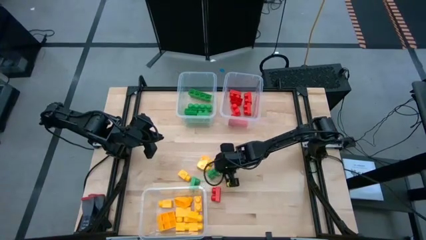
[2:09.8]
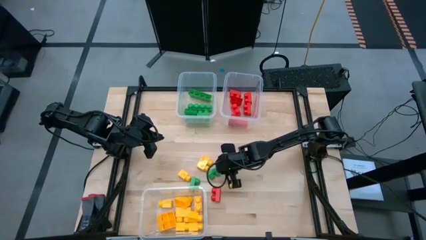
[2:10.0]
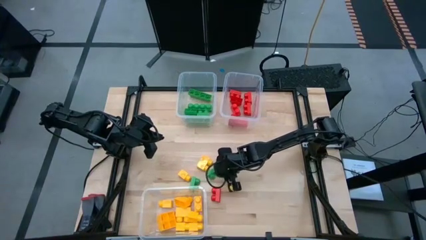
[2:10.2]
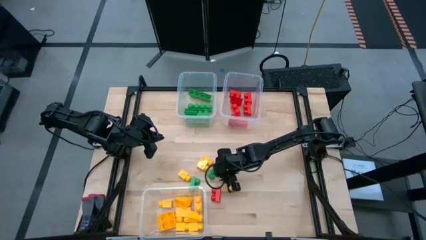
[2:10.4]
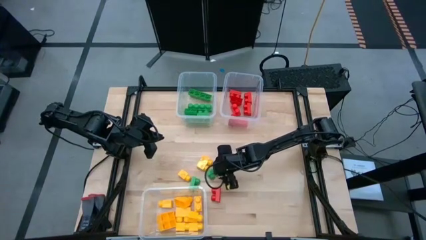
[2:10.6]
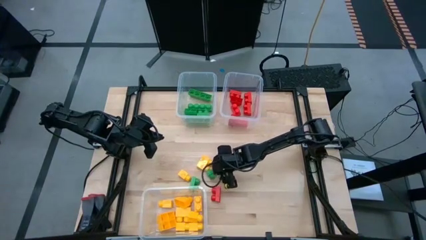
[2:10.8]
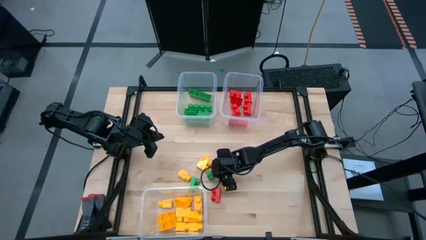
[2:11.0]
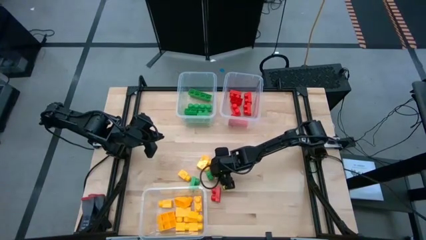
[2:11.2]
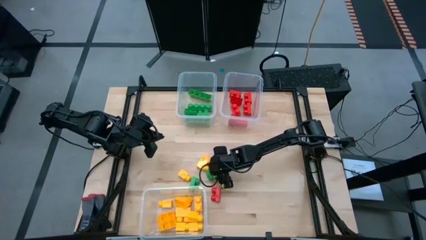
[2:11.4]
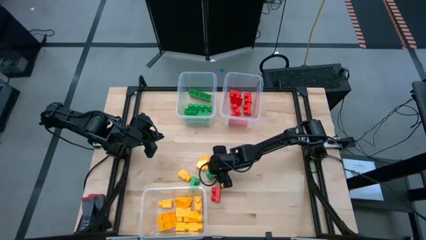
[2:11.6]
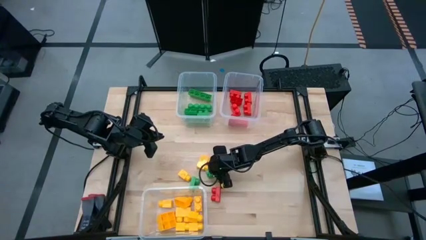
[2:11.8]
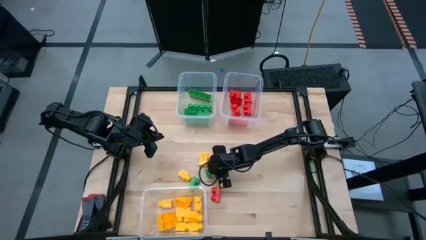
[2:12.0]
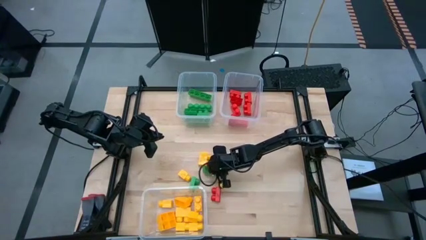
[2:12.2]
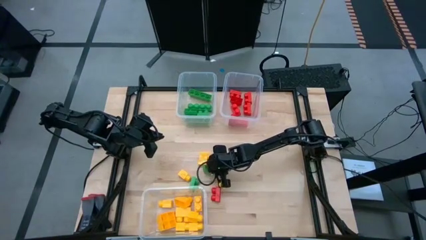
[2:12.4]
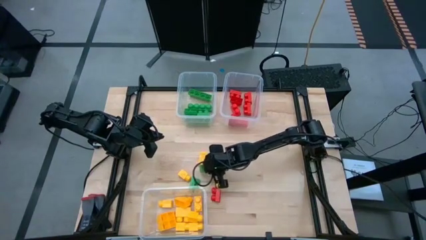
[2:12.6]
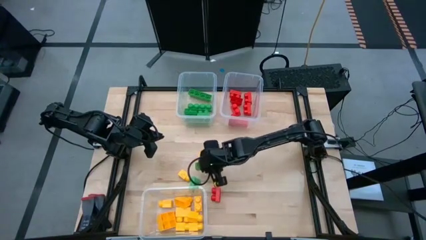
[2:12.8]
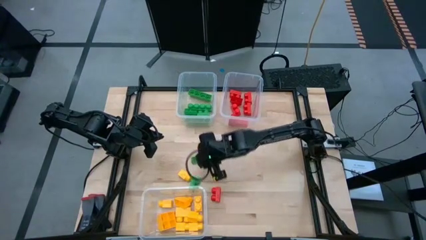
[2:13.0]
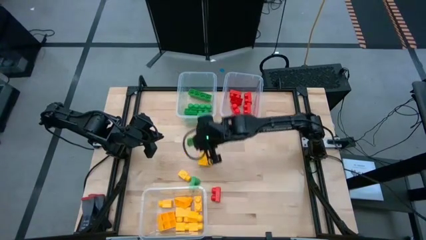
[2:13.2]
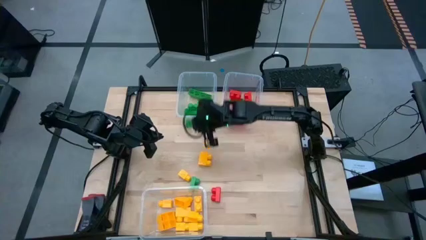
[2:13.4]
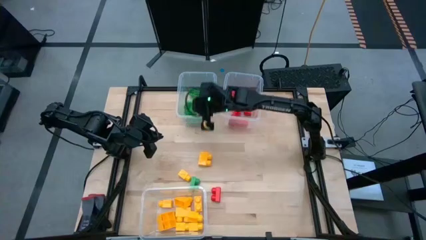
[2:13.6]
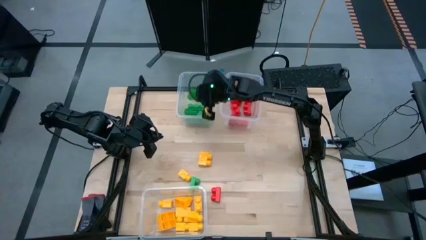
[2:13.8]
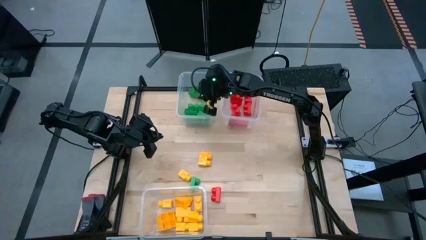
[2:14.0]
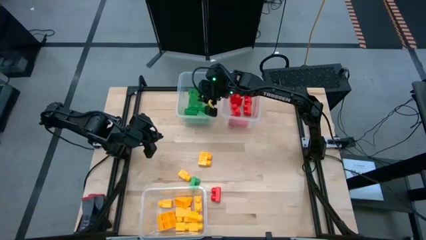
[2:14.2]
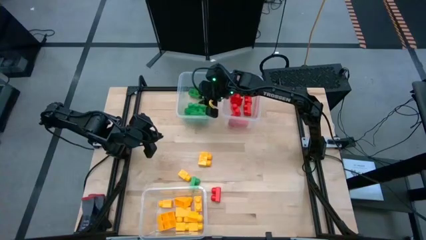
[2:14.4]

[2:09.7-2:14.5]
Task: Sort blocks
Put the green game piece into the top left transparent bin

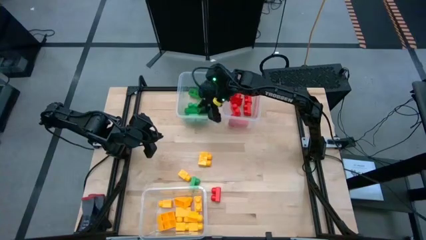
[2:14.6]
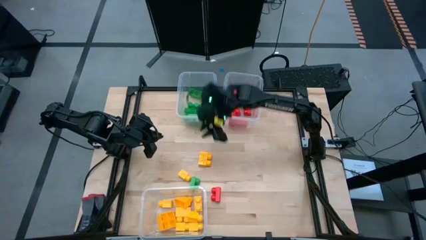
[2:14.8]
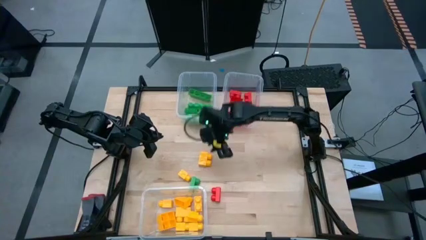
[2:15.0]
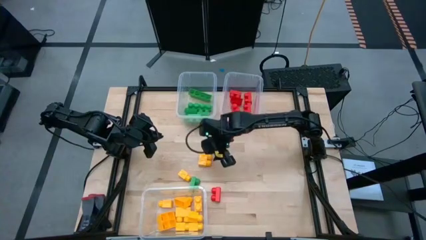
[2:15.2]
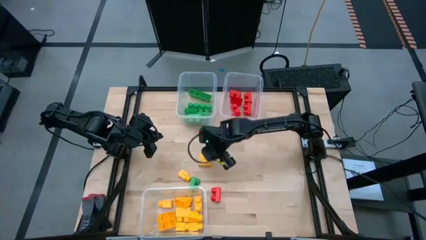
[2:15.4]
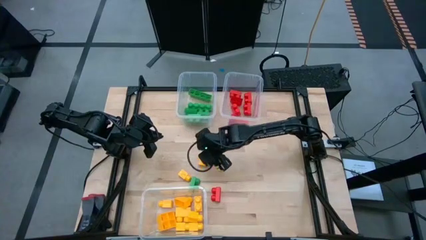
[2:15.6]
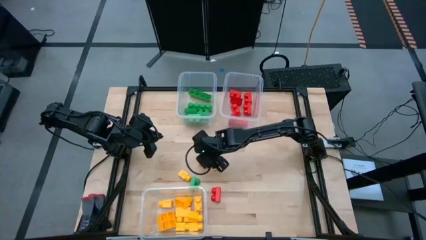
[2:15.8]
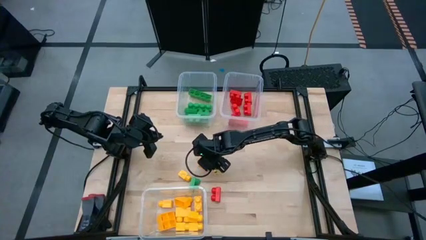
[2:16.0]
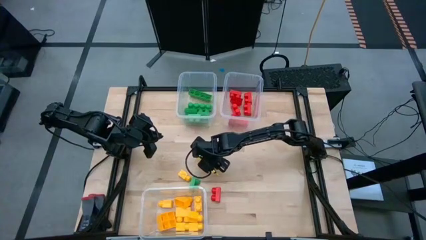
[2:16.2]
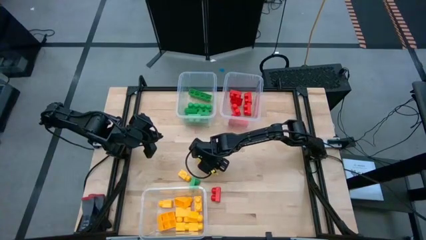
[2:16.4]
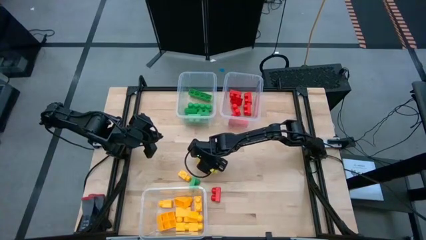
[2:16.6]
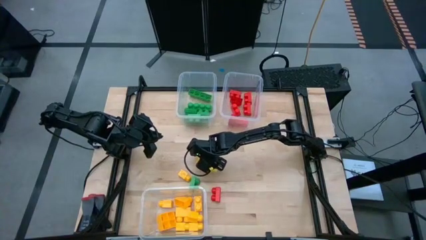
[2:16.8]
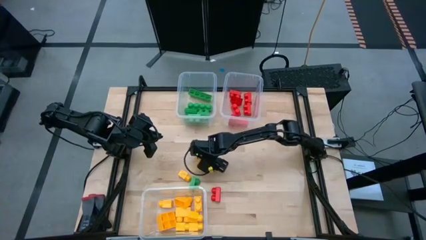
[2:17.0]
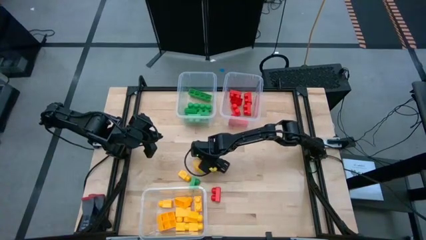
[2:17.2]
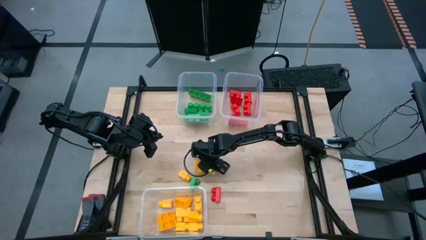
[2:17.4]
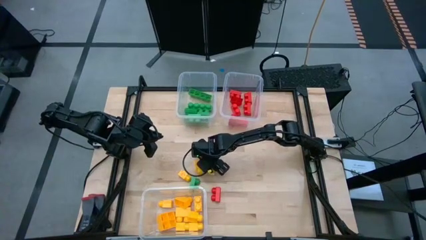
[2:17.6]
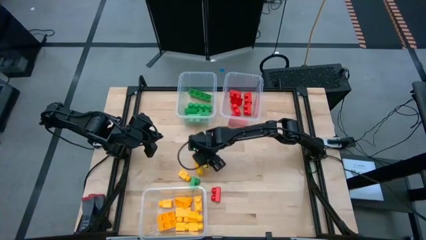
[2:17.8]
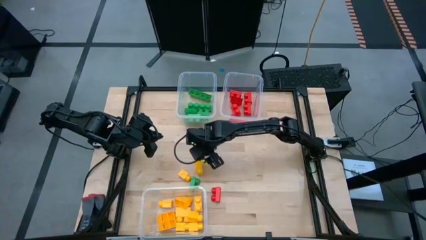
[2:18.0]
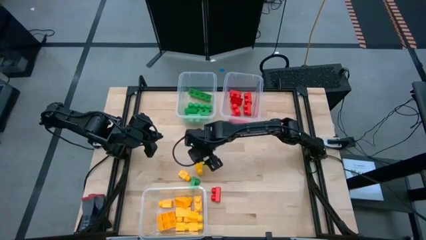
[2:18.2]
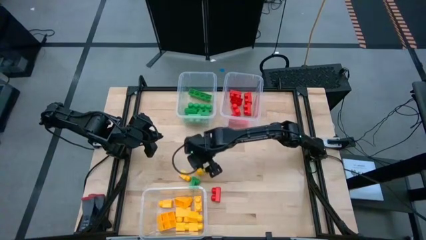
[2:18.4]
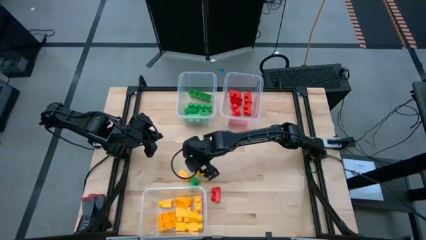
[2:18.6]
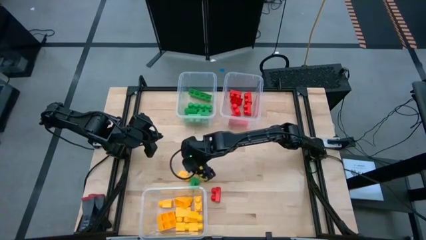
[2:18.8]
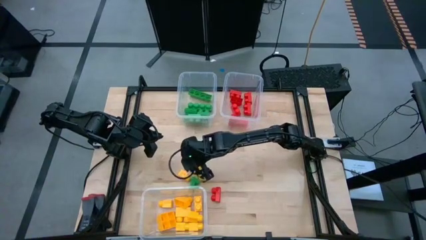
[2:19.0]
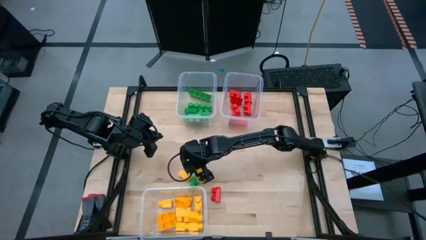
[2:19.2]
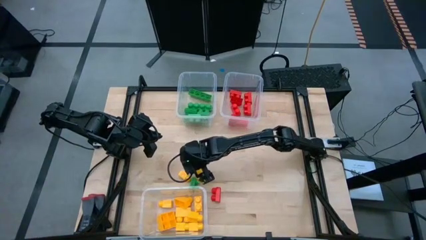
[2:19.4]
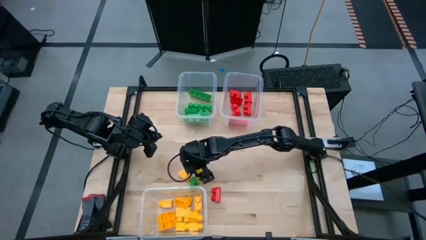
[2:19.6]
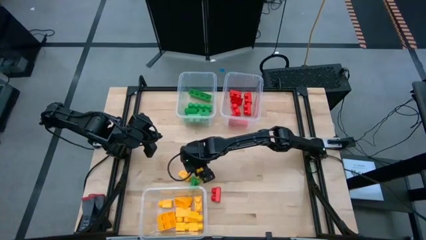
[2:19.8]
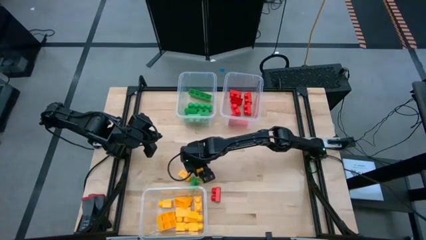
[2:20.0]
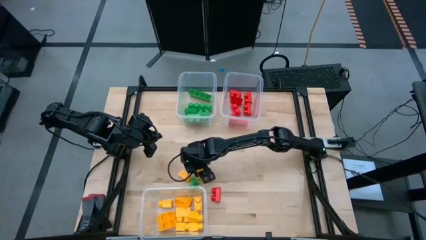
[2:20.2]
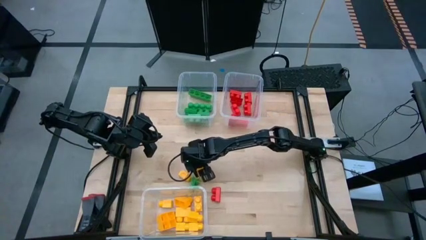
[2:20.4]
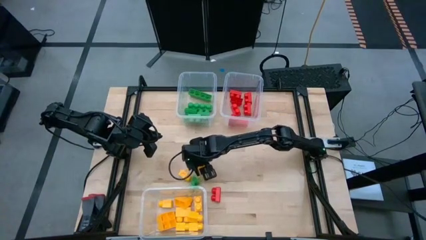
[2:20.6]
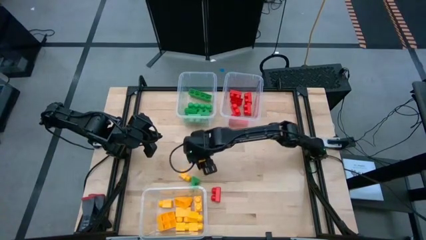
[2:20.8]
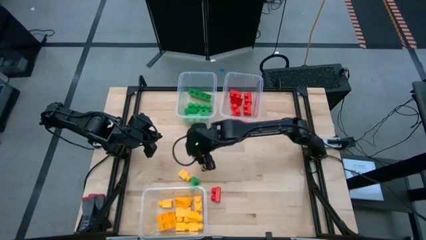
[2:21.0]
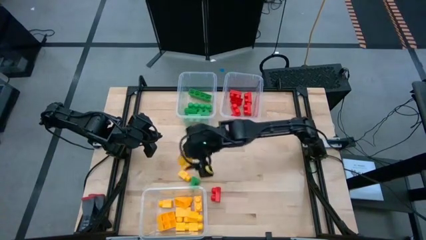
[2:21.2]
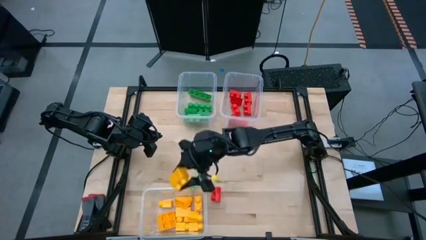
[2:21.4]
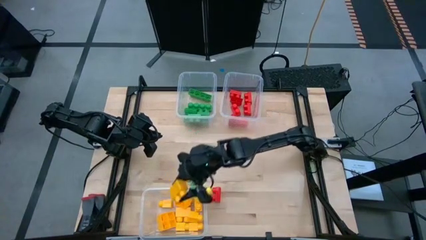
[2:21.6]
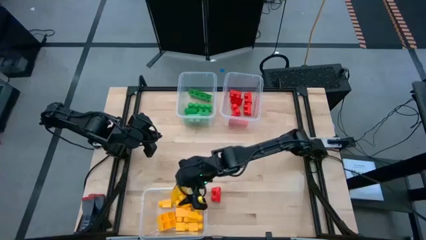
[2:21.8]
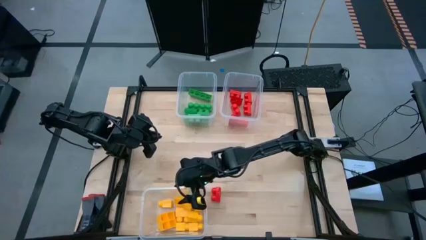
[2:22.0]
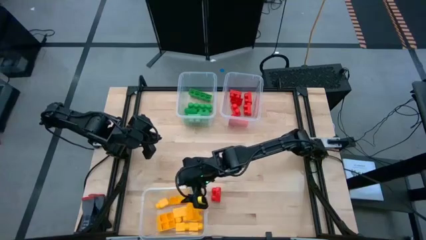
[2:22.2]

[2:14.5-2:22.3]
Put the yellow game piece into the bottom transparent bin

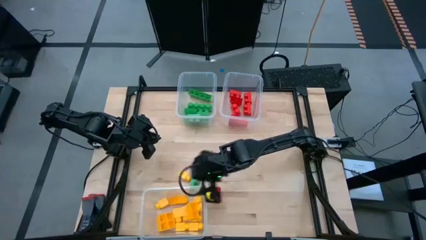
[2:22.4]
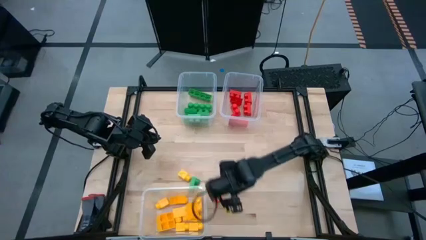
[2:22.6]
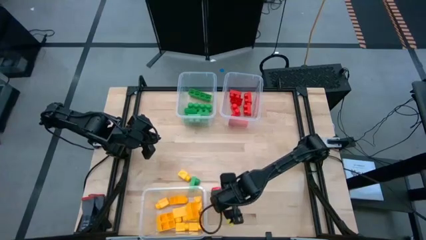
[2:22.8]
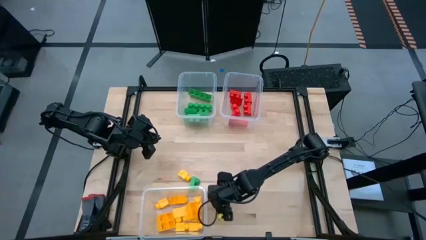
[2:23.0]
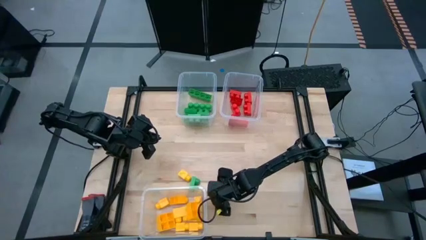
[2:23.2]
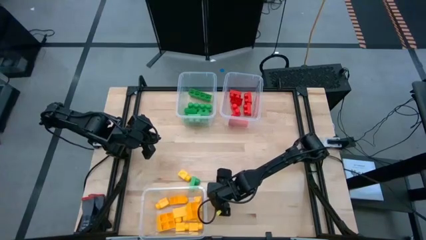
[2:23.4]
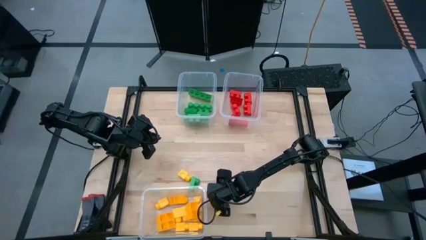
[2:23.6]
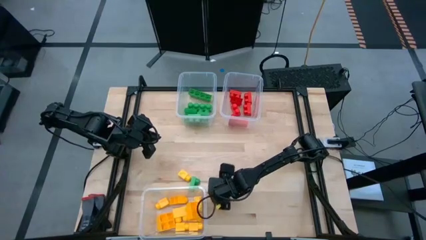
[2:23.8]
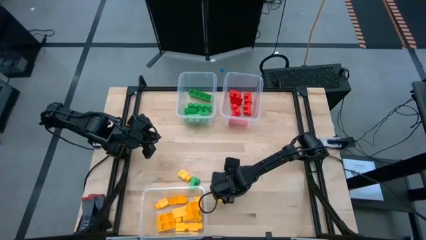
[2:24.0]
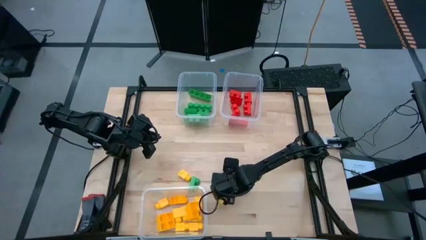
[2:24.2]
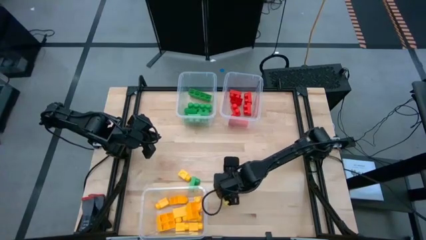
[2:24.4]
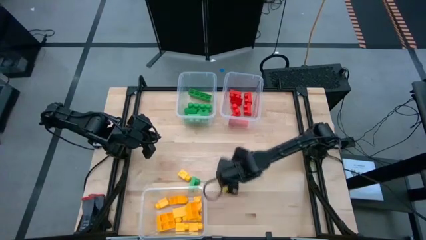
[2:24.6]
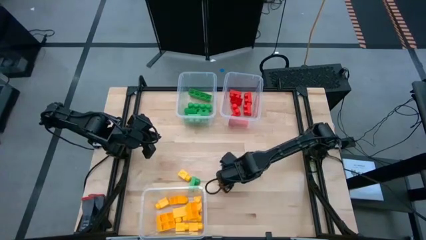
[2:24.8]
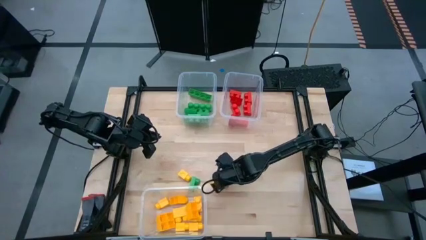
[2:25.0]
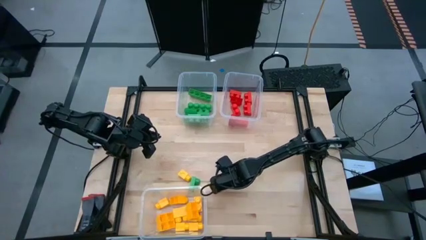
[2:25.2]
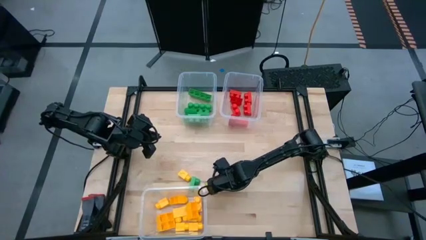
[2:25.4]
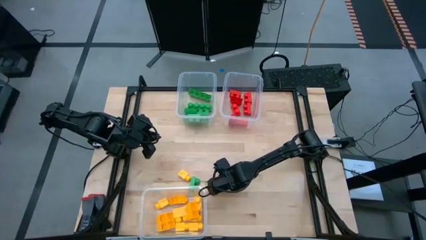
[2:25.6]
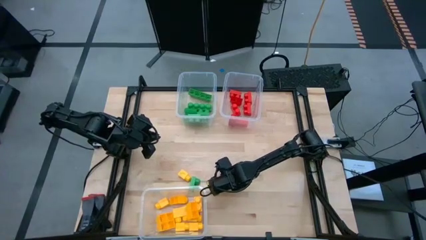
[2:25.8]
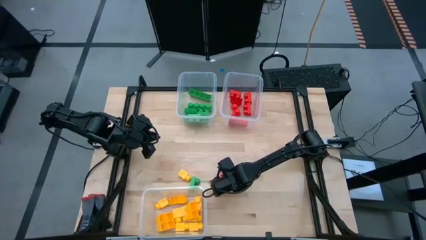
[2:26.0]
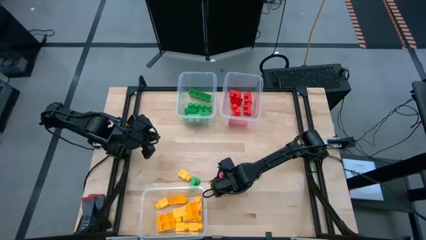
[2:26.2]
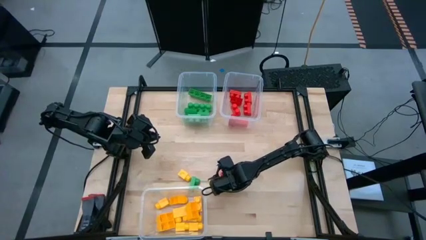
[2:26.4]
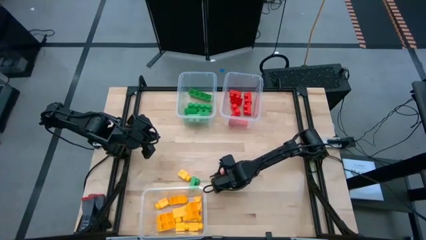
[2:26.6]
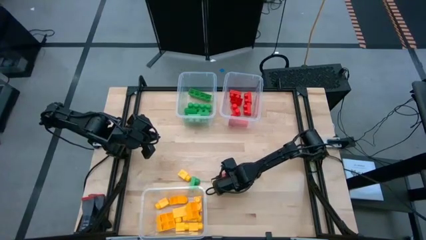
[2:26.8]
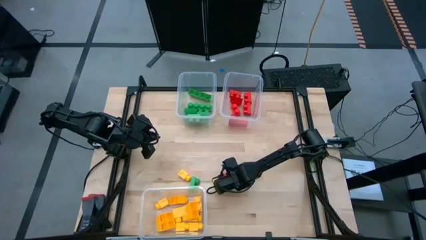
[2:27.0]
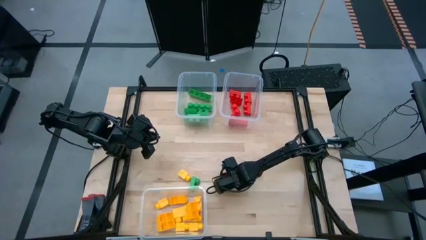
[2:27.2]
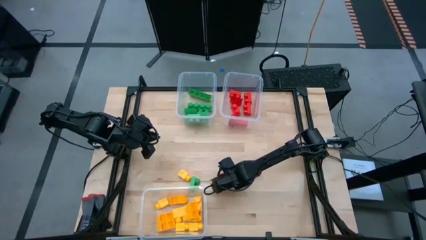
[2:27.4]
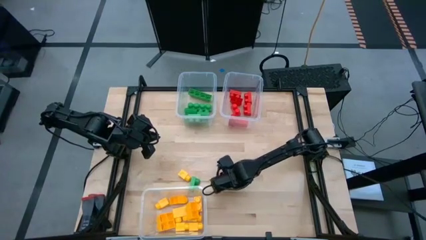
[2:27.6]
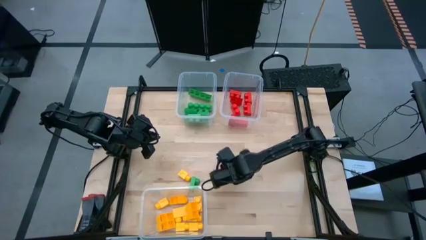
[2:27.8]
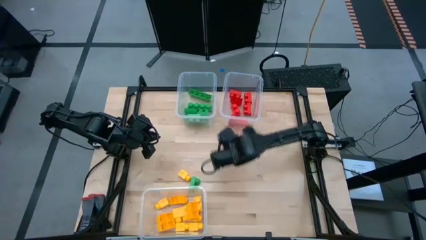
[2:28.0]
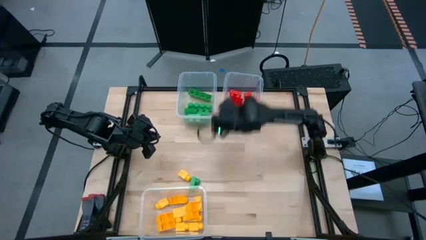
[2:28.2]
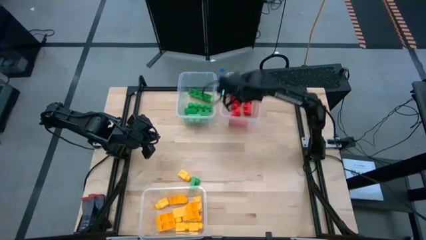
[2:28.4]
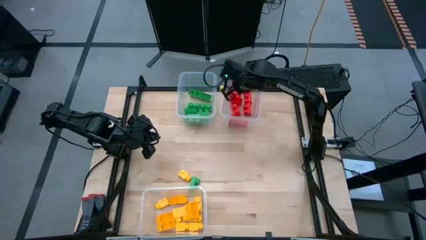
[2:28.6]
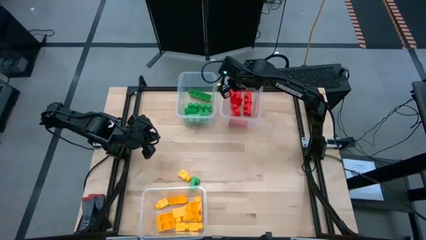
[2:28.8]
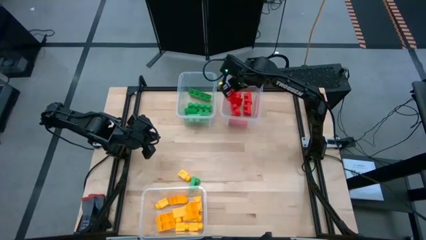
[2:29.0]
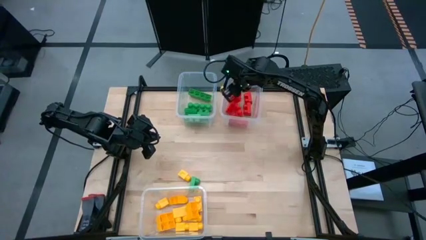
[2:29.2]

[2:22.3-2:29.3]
Put the red game piece into the top right transparent bin
